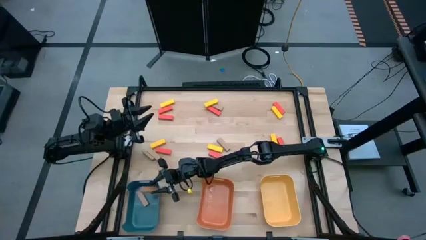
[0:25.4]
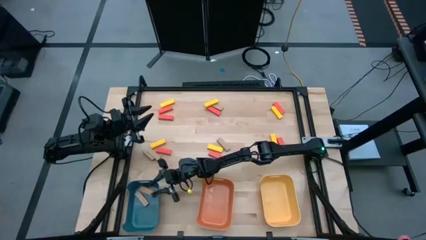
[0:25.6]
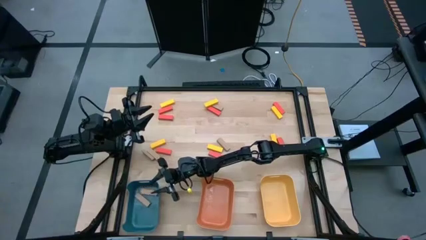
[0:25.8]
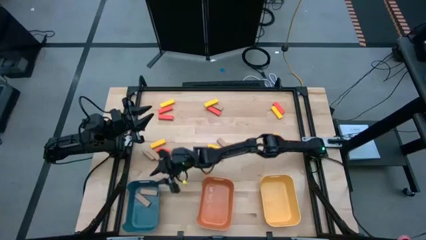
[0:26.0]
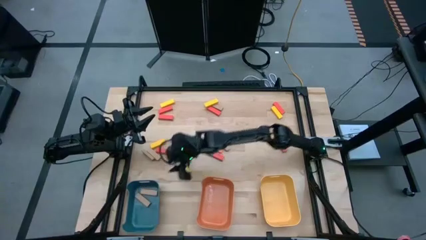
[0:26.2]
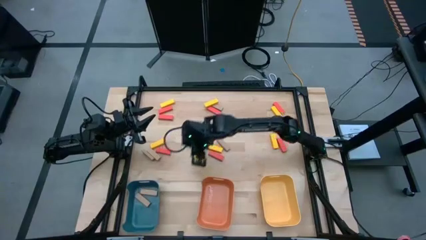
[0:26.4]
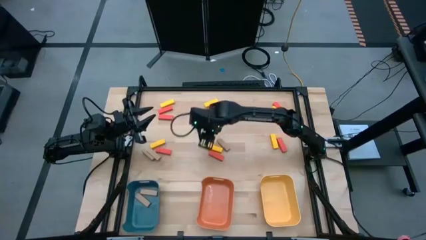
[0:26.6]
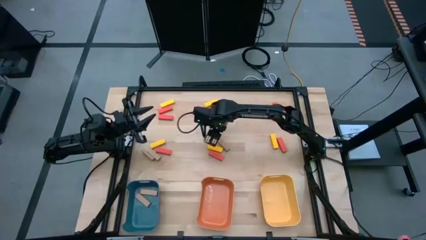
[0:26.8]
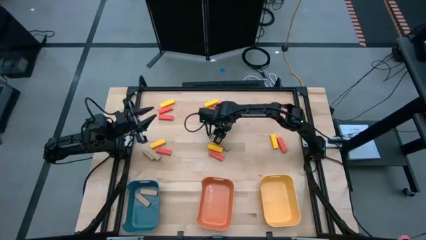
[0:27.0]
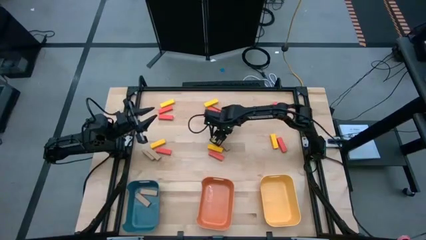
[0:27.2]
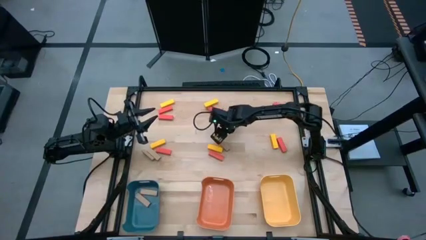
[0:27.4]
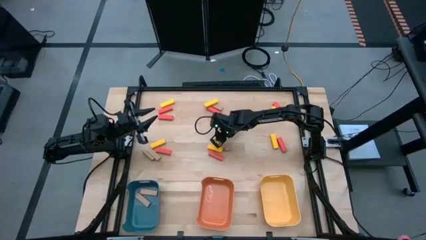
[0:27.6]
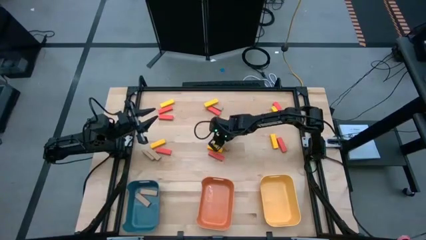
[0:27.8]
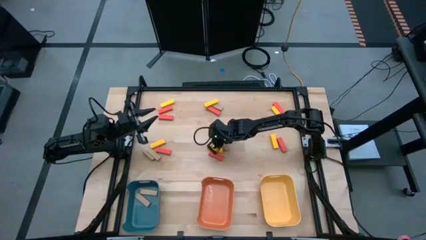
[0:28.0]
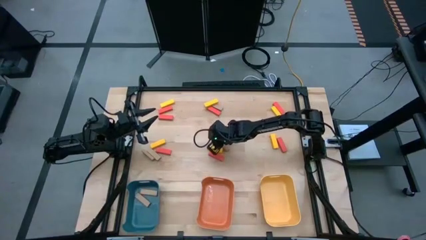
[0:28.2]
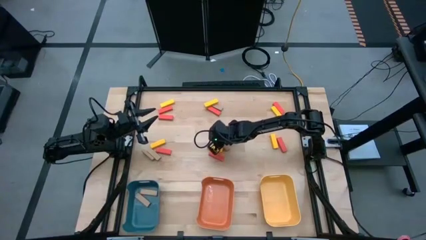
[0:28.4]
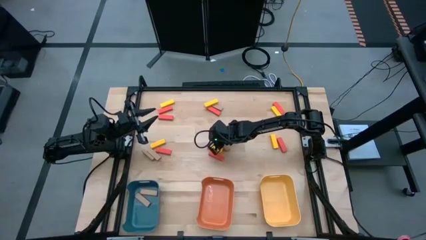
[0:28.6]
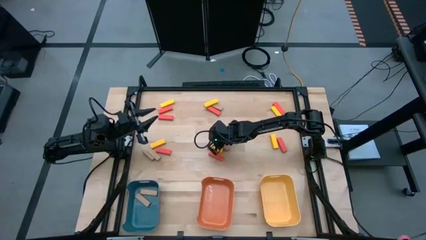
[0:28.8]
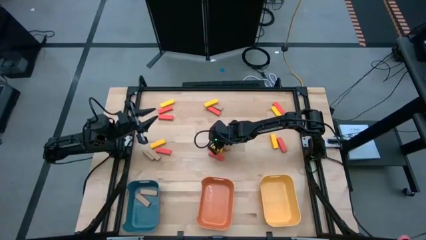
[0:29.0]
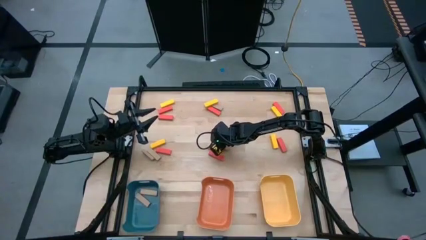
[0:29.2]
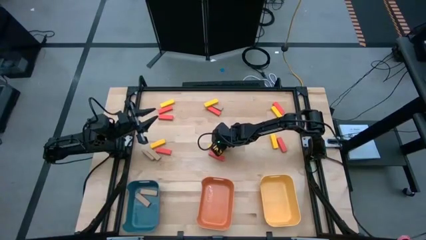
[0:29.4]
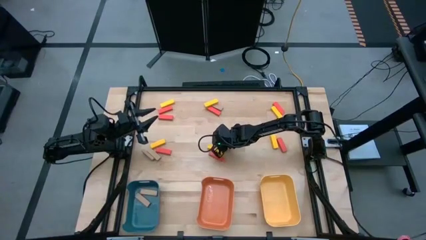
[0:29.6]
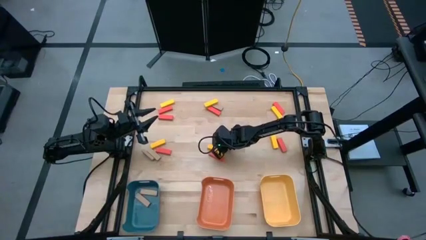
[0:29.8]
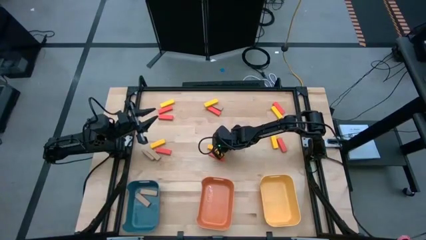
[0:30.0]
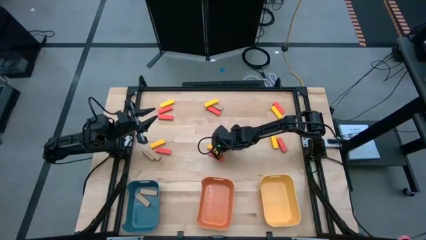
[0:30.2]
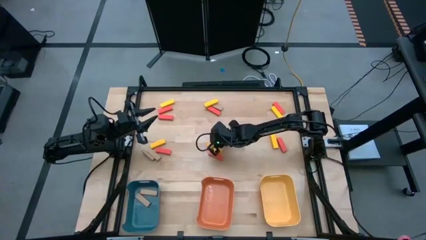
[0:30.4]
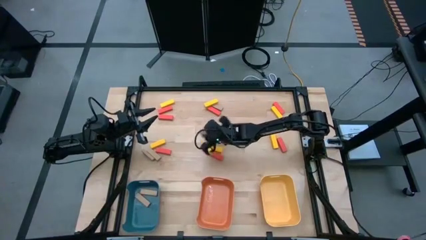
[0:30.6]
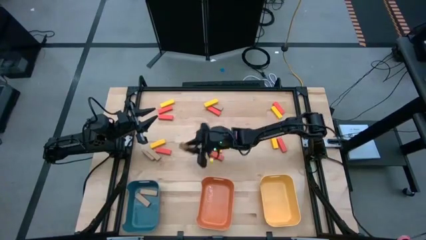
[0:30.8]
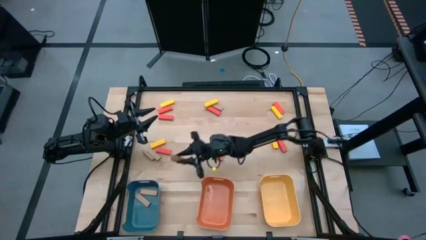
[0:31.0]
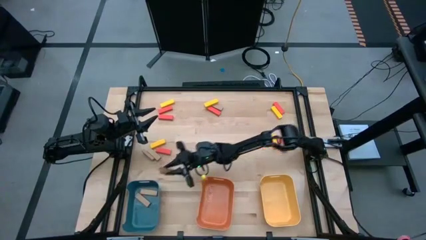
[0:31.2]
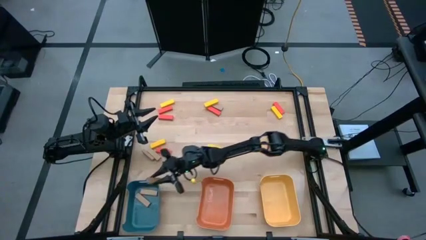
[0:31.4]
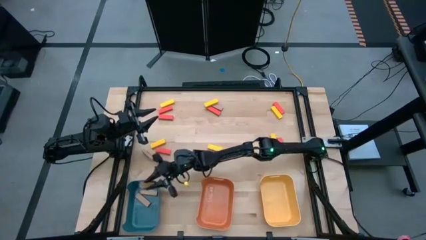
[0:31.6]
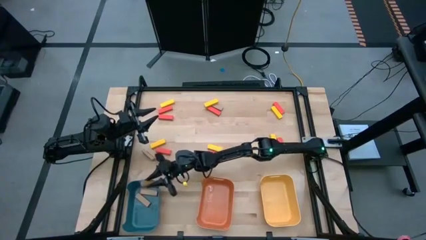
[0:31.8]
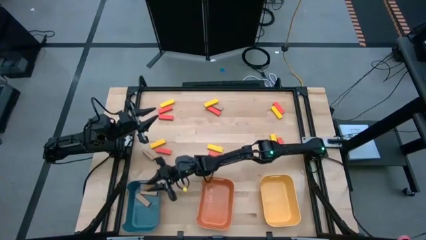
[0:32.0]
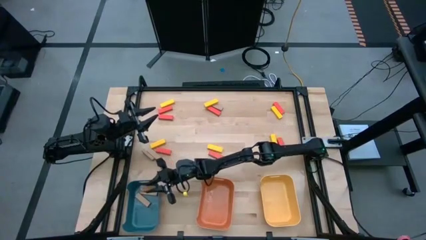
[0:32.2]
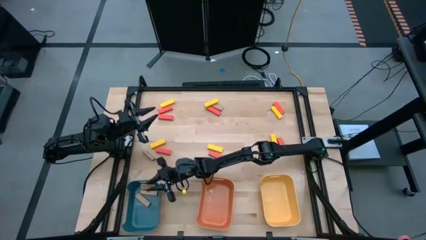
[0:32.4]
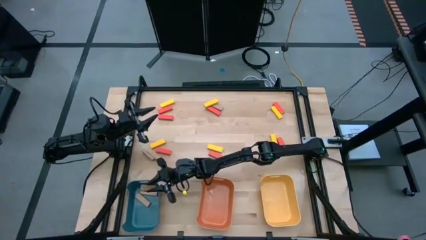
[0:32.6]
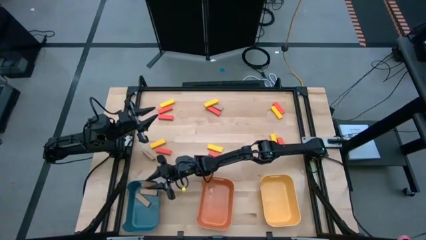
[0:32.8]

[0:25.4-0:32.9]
Task: Sort blocks
Put the bottom middle brown block into the blue bin

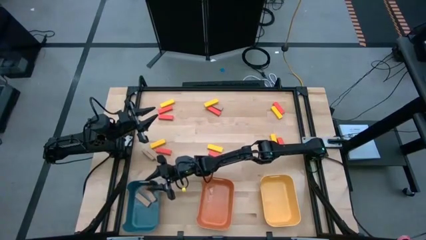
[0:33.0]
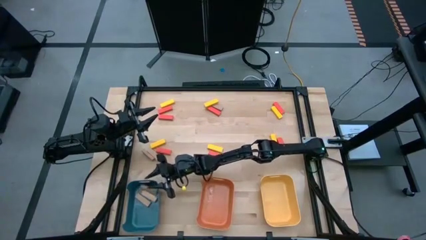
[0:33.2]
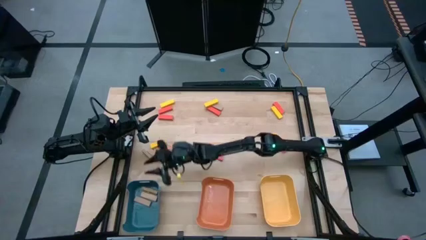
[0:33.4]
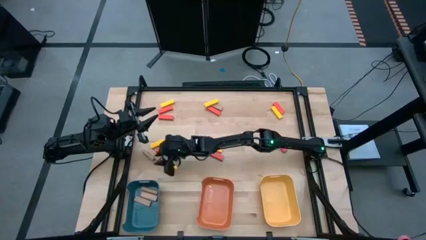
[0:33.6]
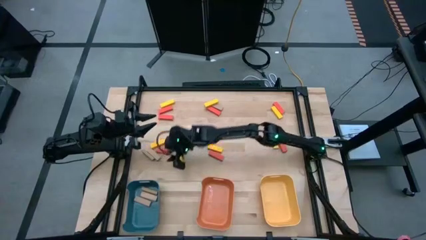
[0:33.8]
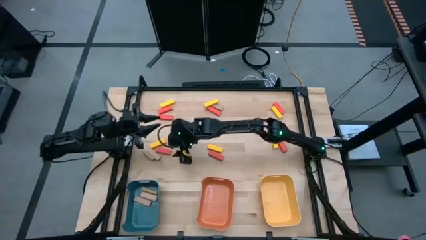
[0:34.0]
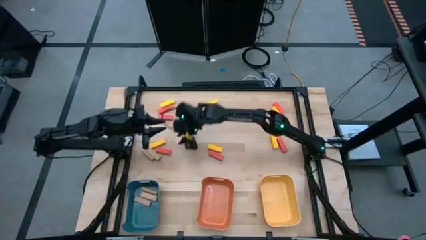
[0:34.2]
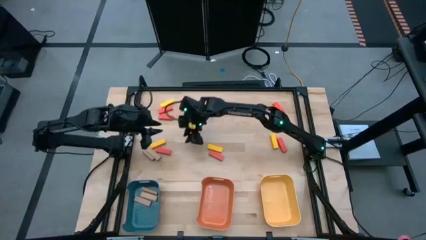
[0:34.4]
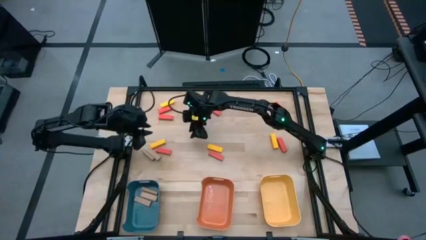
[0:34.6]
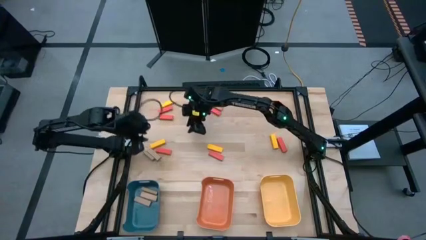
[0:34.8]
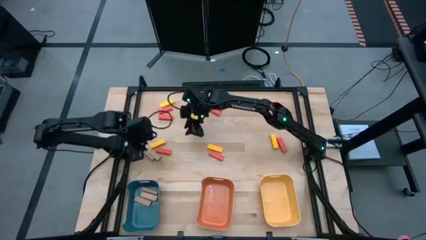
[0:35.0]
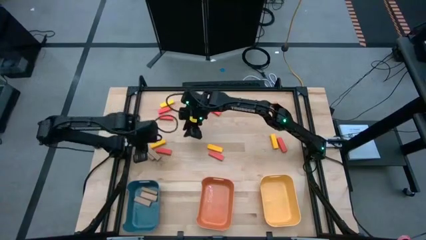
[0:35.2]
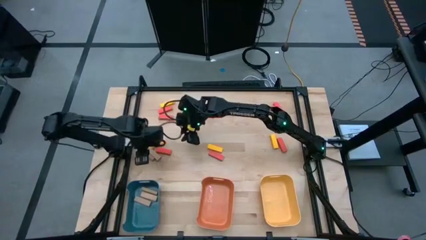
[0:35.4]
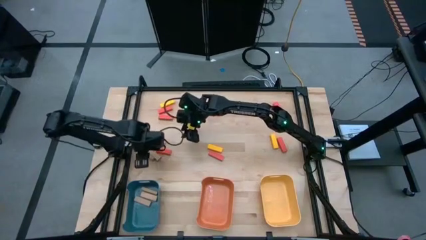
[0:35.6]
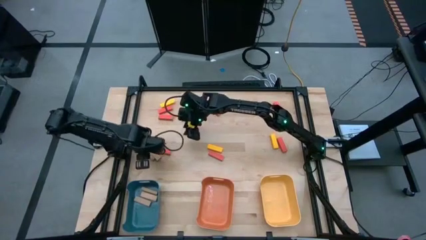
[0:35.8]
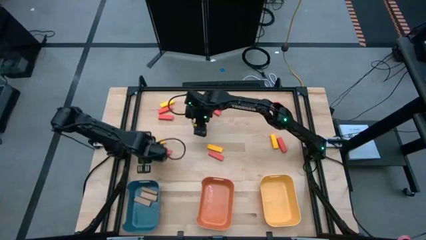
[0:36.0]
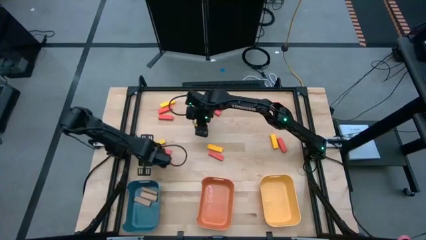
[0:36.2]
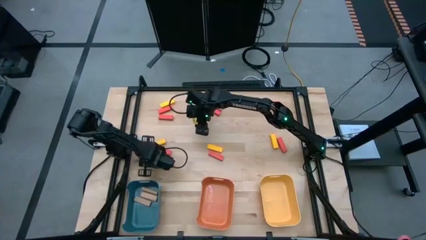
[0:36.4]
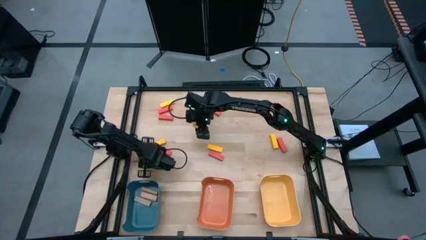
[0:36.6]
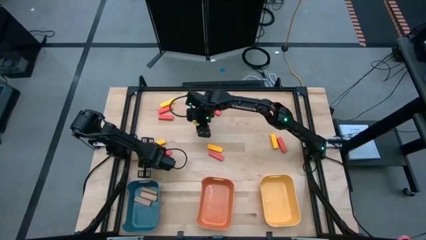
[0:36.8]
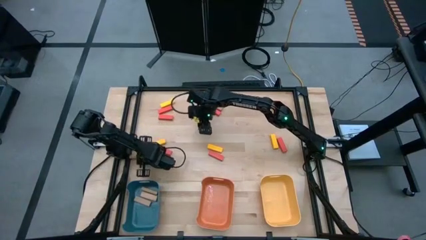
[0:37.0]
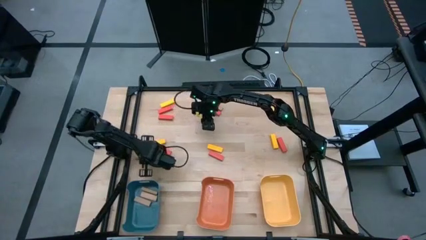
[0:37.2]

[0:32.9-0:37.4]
Put the bottom left brown block into the blue bin

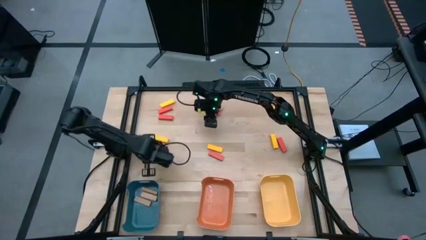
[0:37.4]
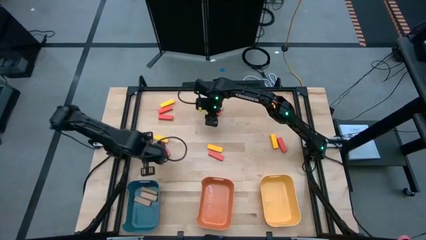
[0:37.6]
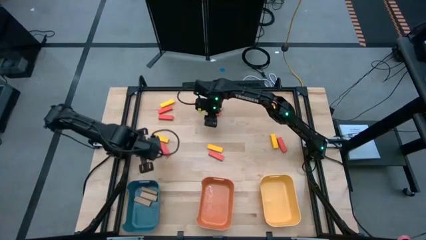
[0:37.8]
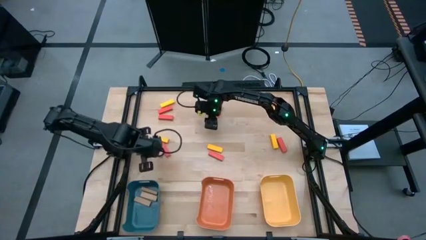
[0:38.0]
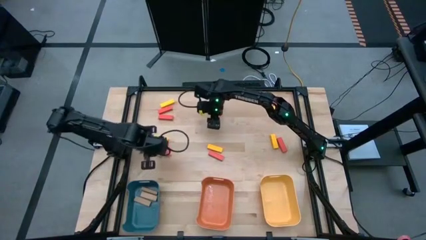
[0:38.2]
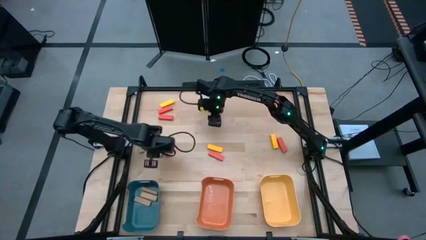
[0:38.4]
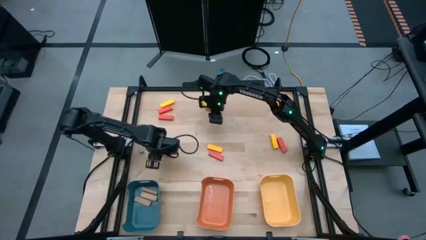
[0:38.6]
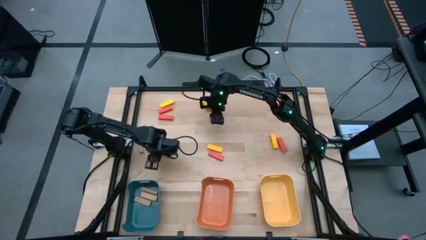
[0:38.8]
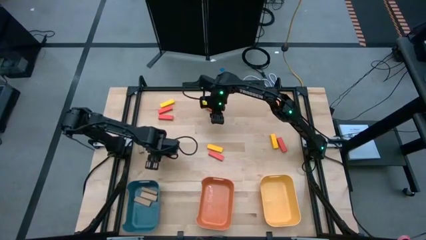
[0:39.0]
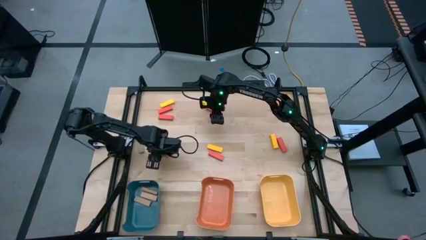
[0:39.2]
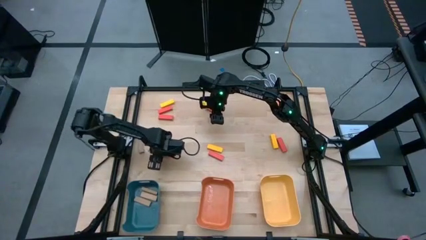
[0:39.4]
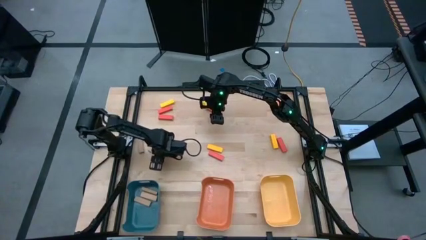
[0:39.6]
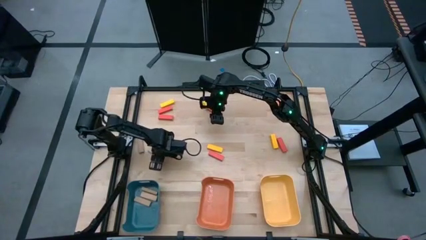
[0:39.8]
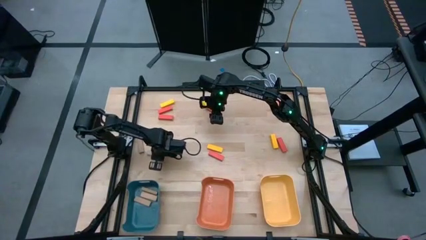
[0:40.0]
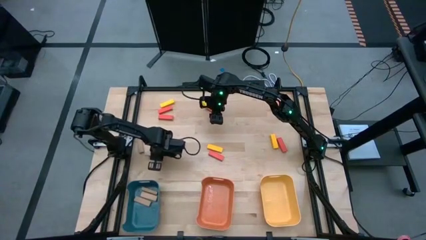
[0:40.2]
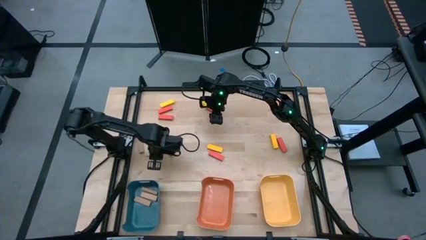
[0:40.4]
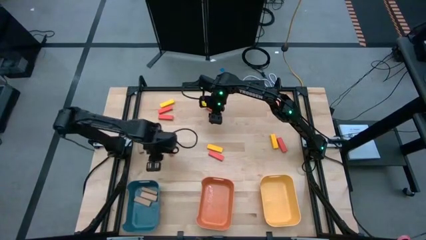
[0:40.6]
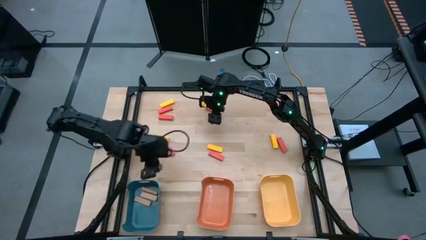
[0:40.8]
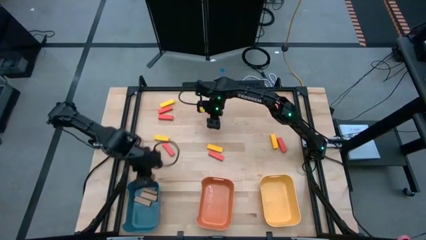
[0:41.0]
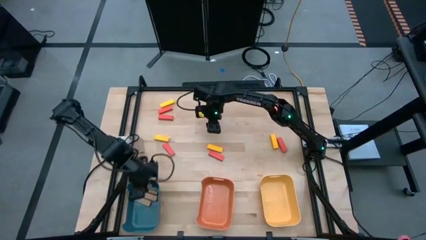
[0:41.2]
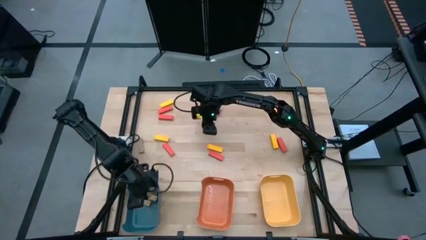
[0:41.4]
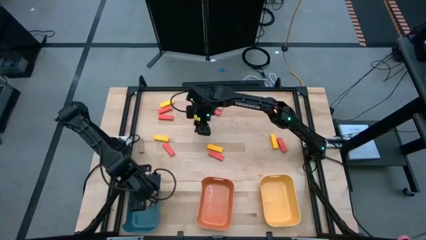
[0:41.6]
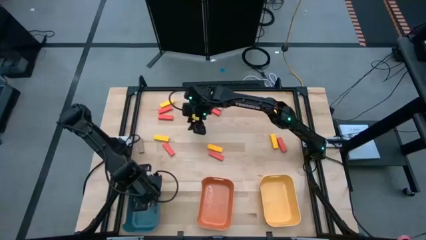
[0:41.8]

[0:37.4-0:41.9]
Put the bottom left brown block into the blue bin
